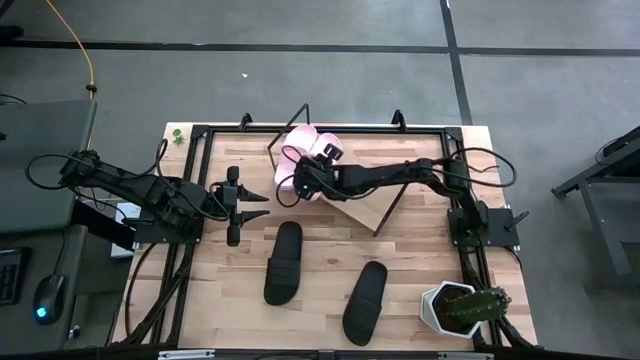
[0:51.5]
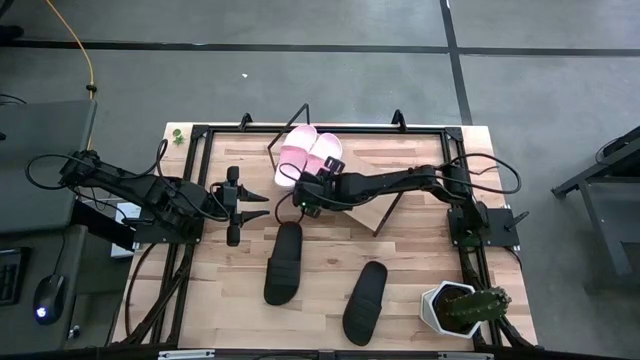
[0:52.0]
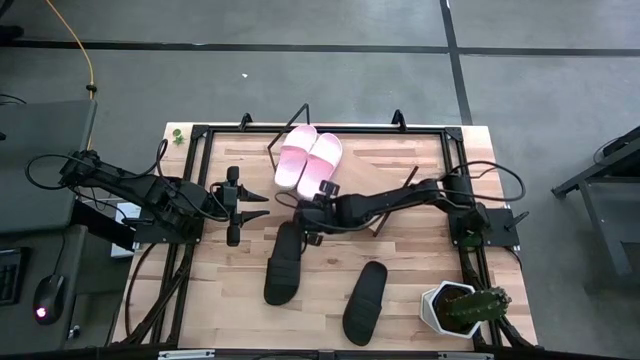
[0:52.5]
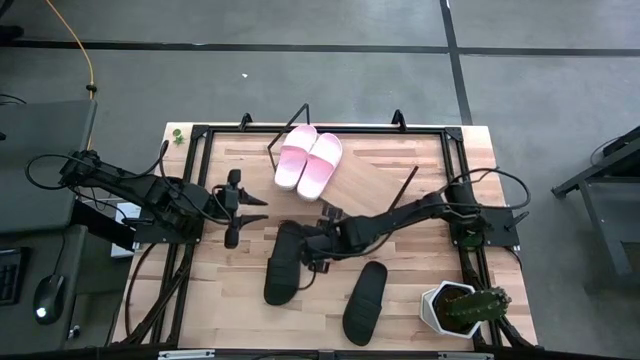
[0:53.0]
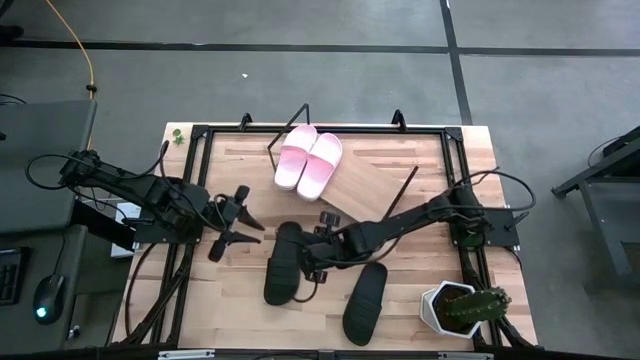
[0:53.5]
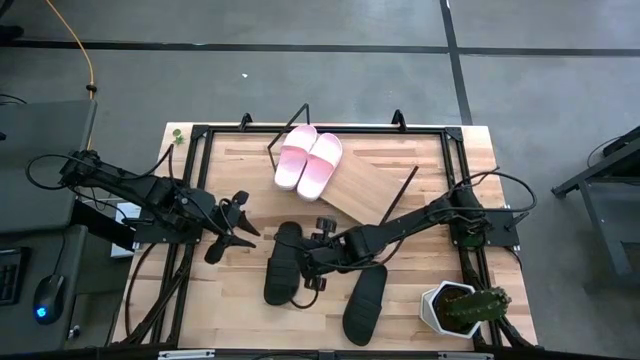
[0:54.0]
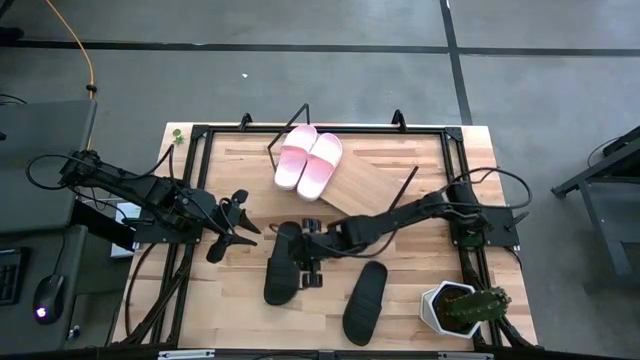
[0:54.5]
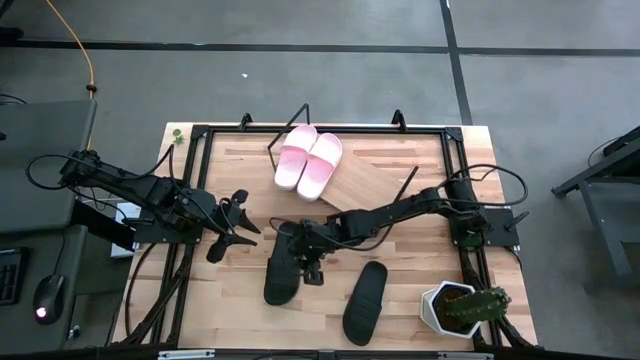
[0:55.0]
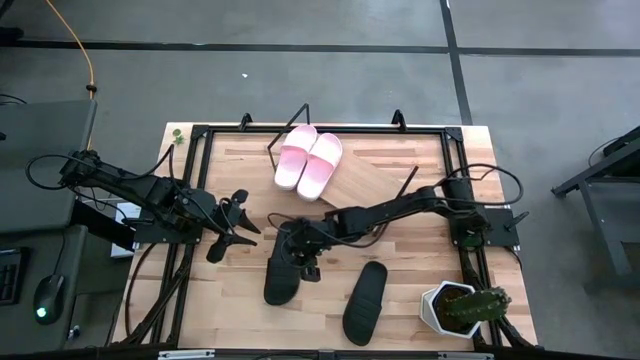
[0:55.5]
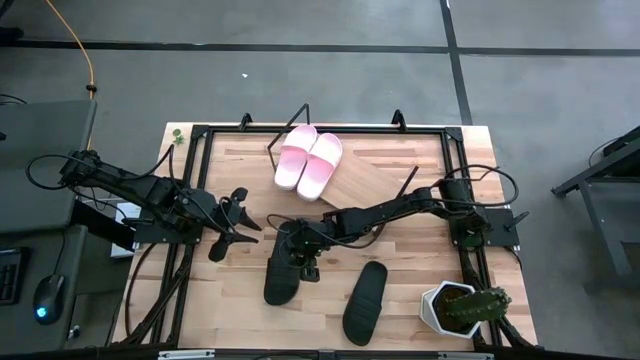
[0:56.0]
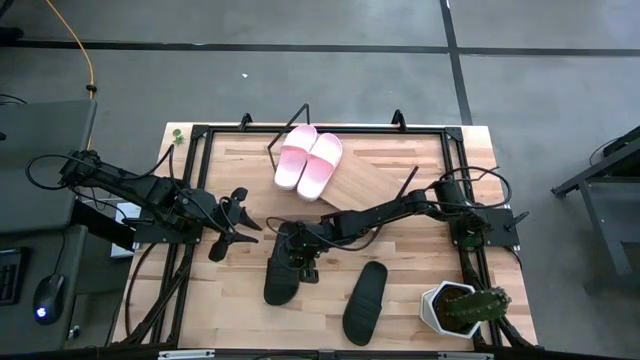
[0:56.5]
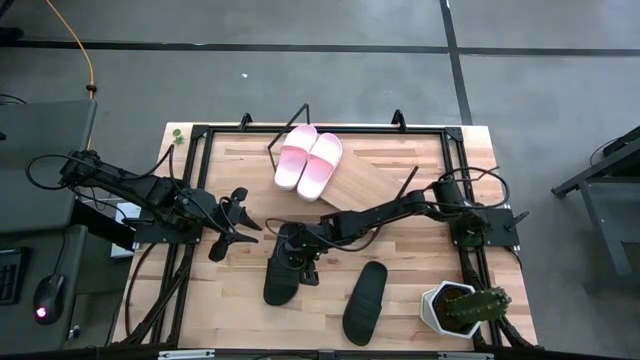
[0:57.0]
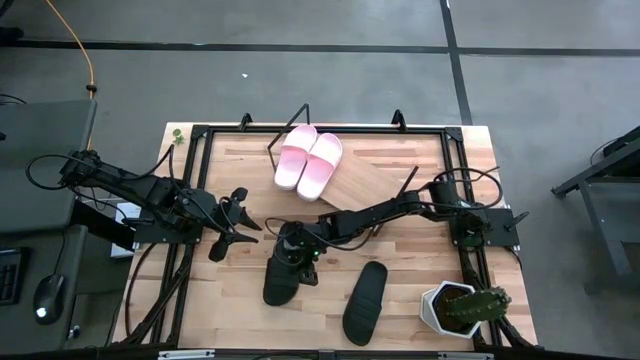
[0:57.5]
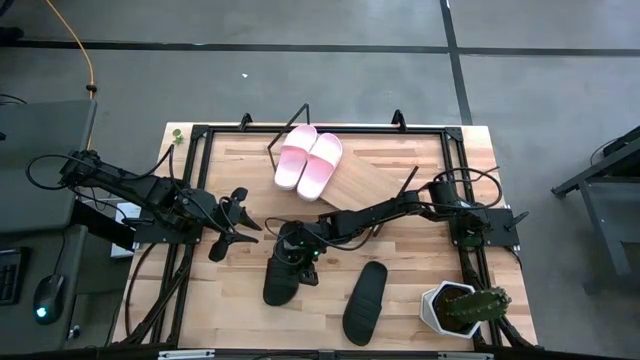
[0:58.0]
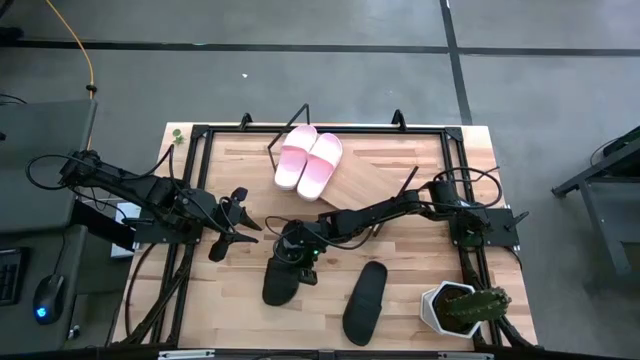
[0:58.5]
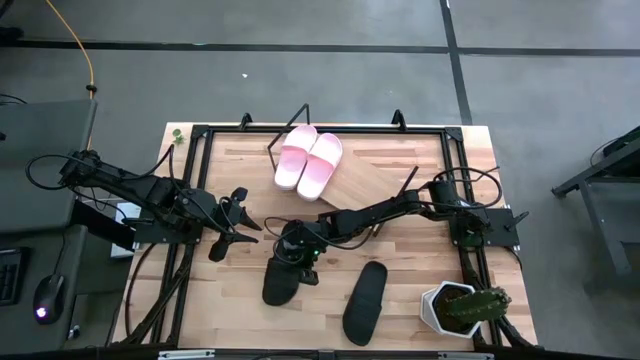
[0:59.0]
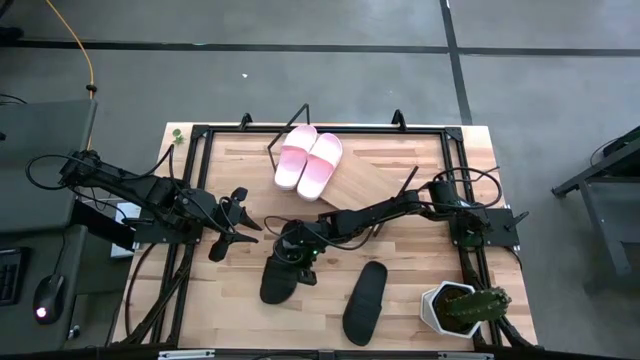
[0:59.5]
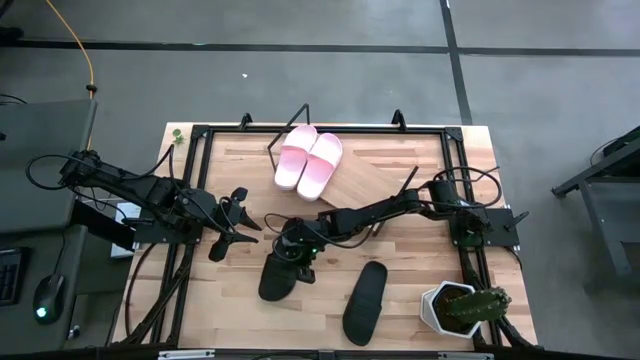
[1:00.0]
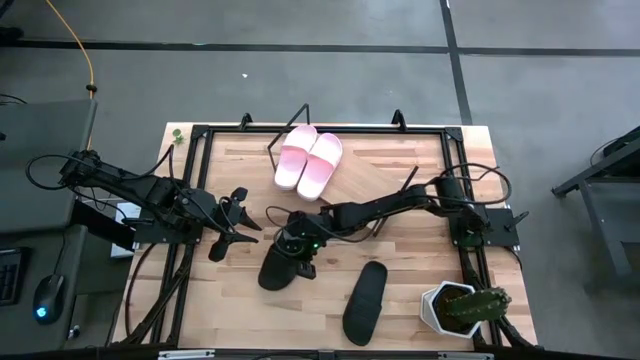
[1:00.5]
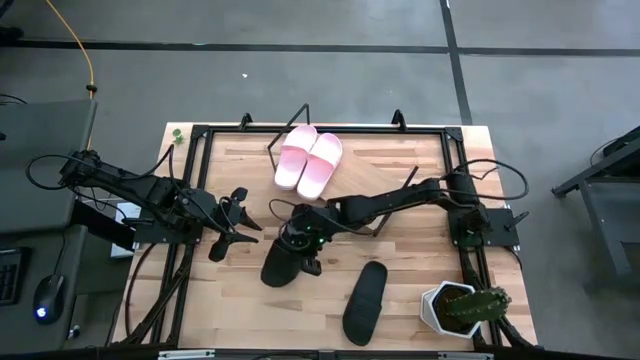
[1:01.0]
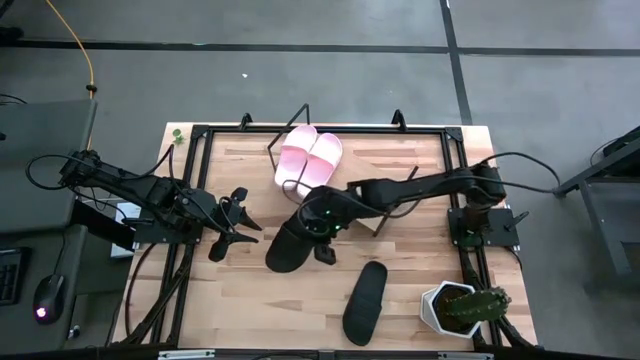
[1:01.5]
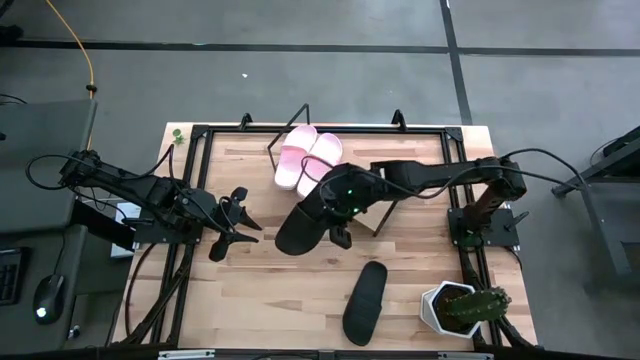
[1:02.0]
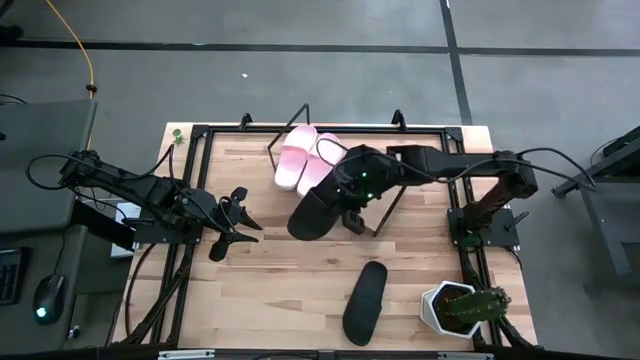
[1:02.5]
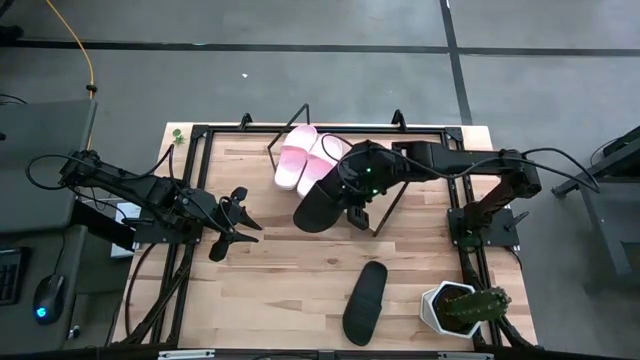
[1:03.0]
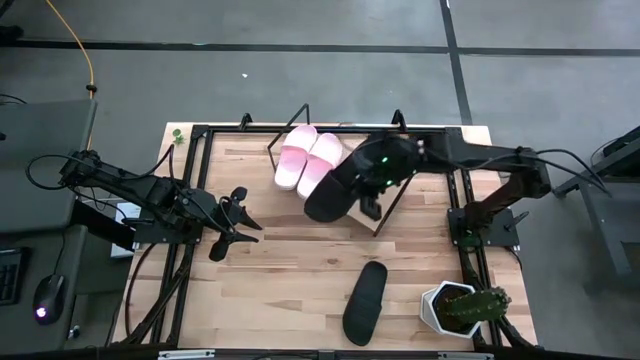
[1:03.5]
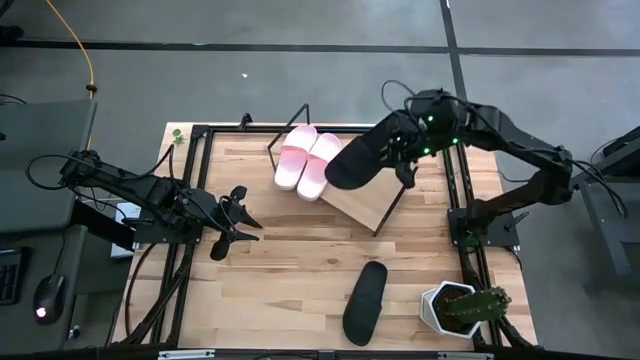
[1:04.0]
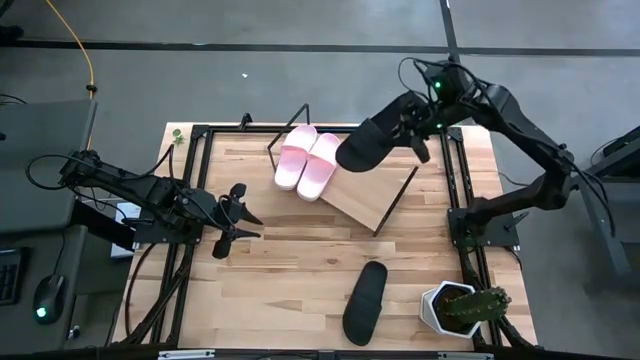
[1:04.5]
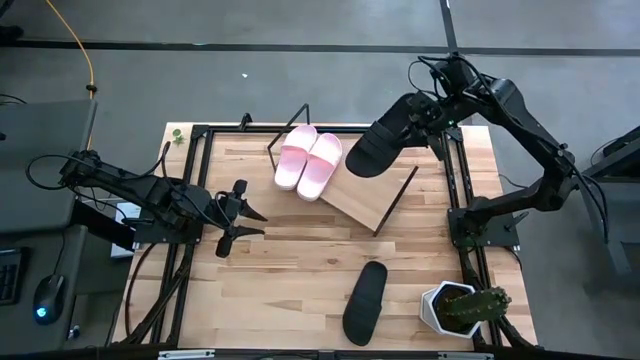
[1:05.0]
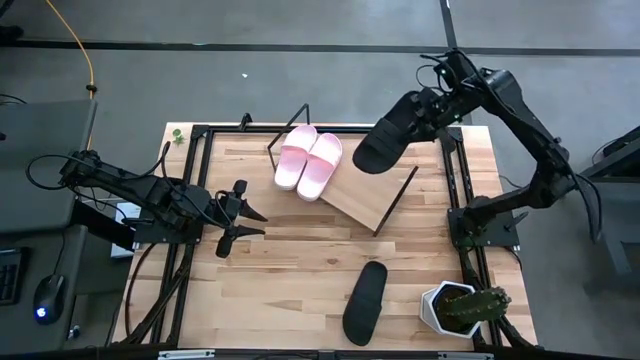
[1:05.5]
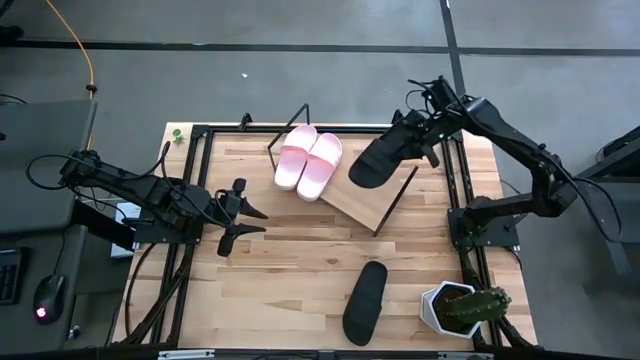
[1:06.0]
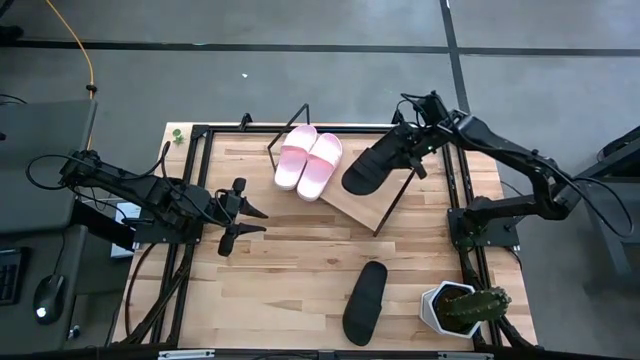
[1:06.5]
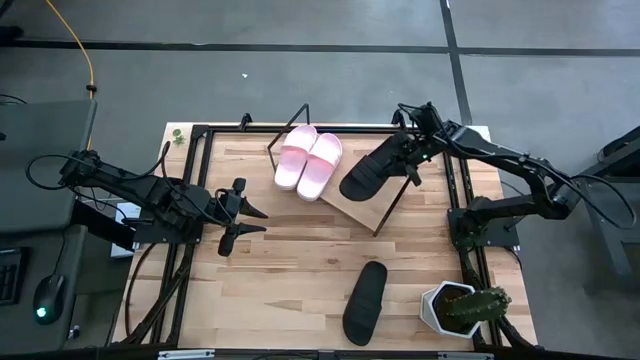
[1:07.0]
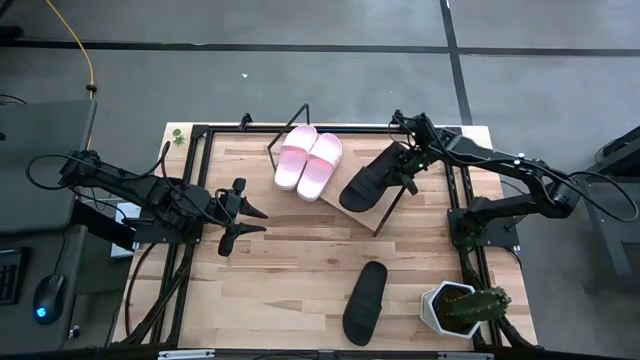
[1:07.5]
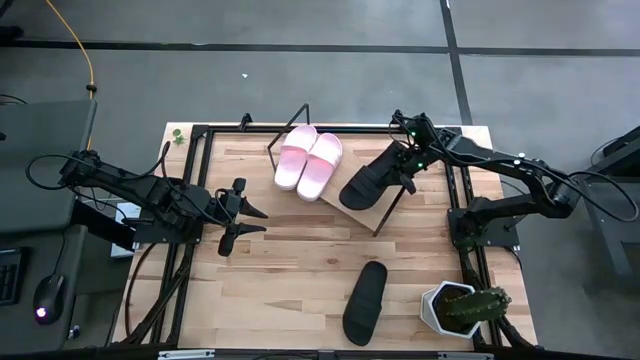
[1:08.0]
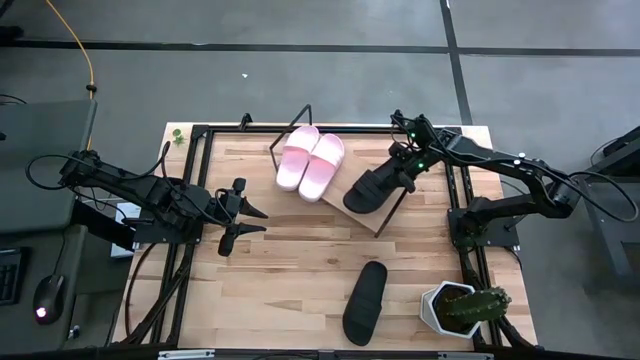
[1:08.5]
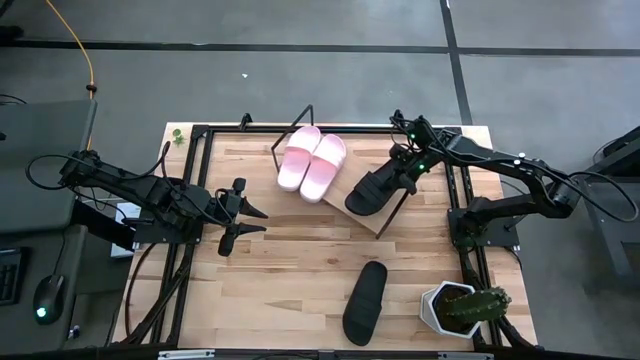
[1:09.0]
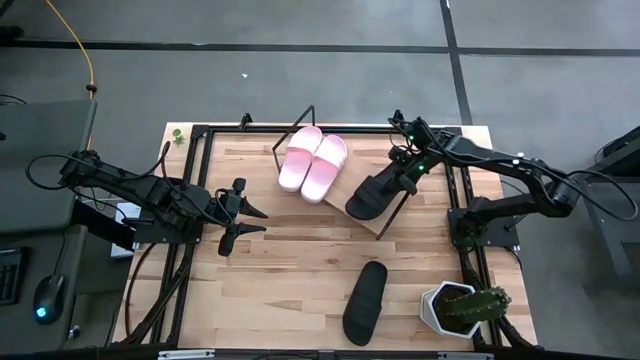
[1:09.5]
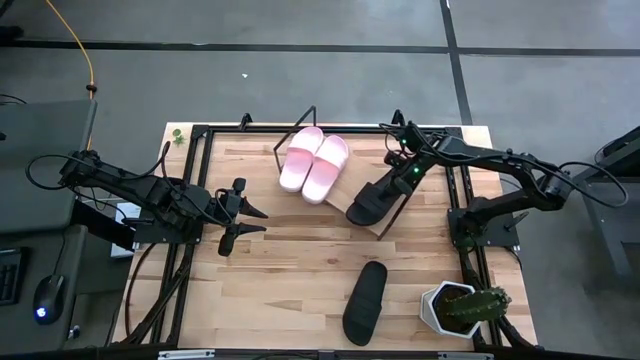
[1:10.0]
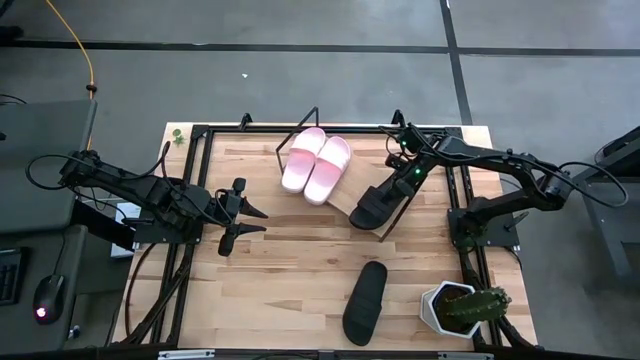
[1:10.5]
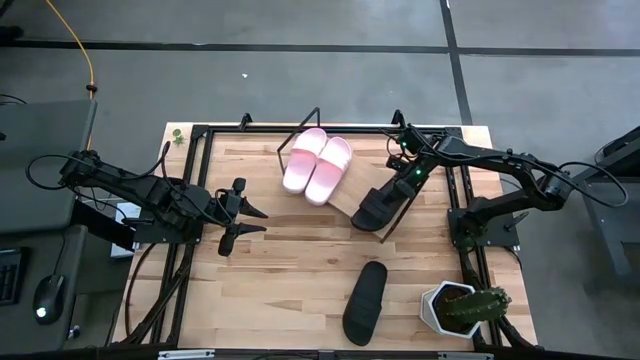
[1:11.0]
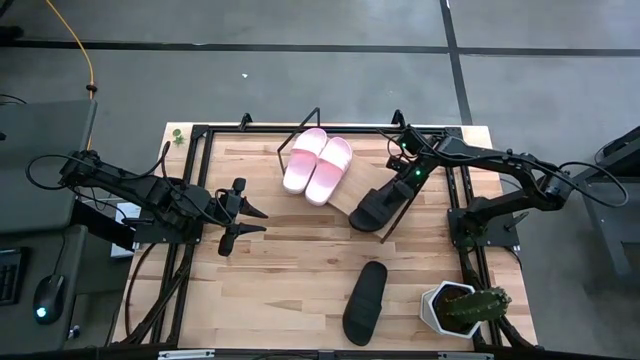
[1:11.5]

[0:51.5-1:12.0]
Task: Pick and place slides into the shelf
Put the left black slipper on the shelf

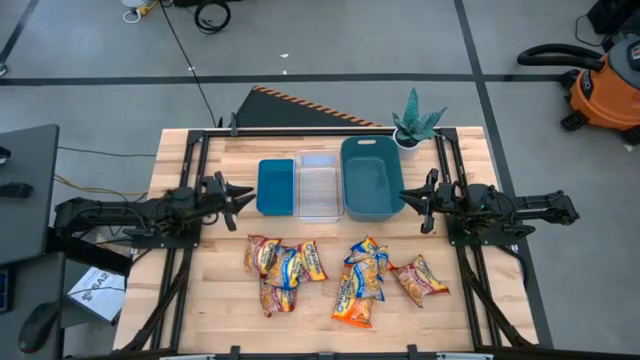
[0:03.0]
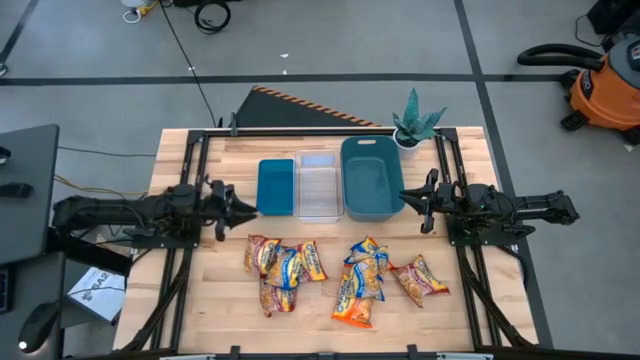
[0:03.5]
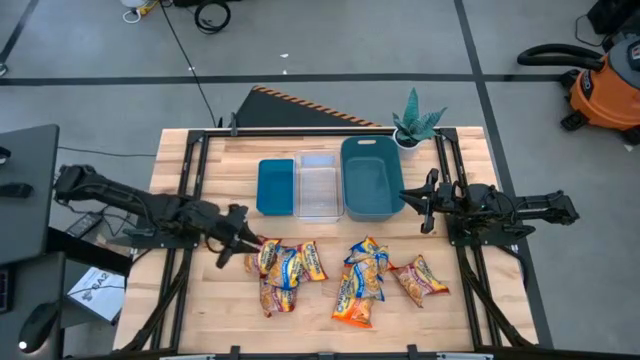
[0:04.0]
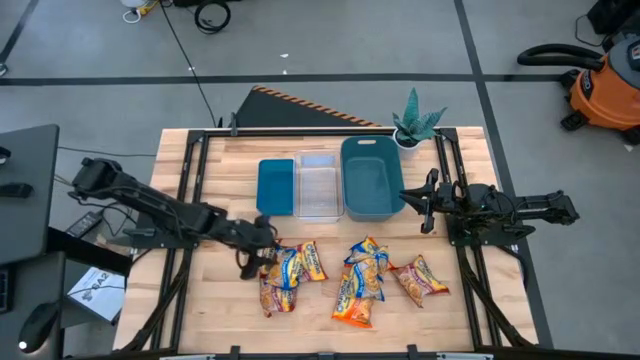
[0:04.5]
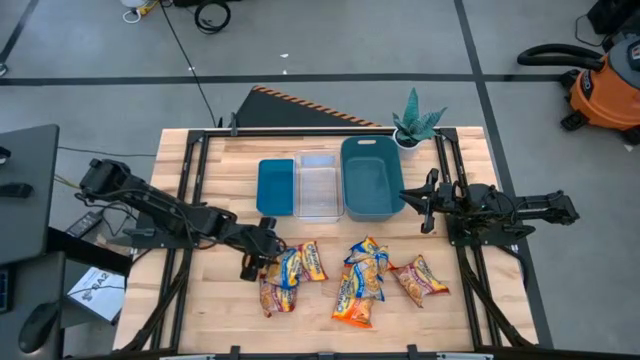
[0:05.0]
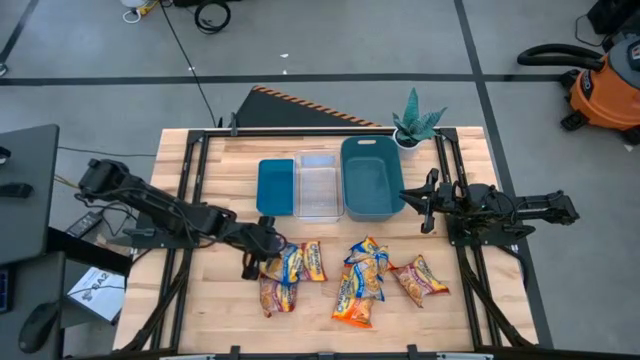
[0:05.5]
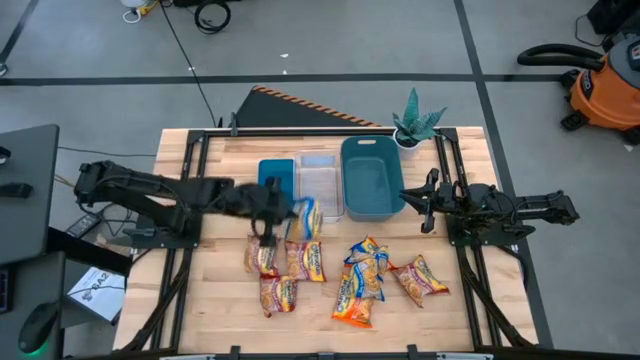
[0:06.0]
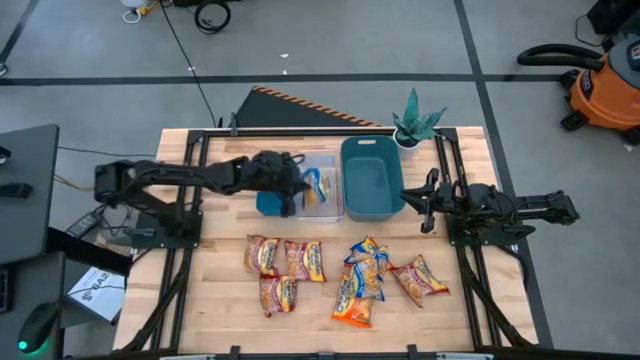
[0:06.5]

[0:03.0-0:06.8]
Task: Sort Maruchan noodles
Put the left blue noodle into the transparent bin
